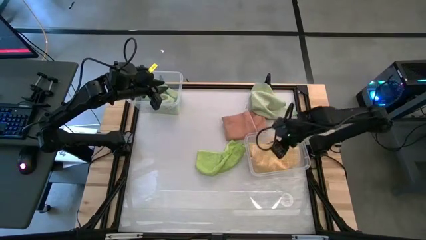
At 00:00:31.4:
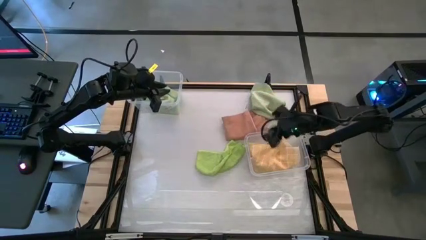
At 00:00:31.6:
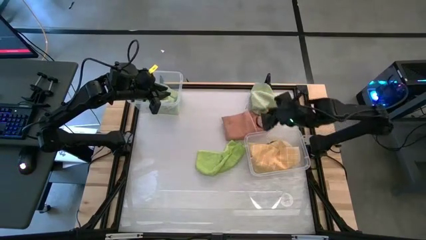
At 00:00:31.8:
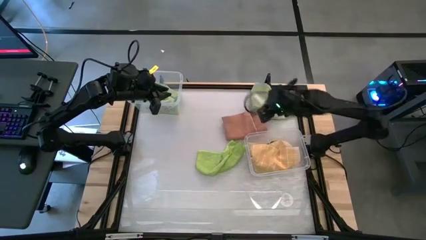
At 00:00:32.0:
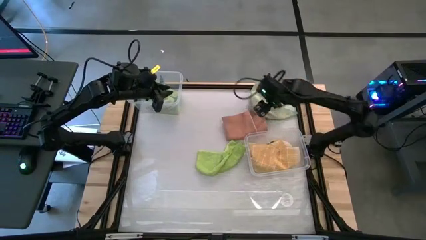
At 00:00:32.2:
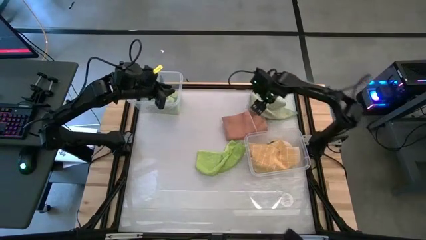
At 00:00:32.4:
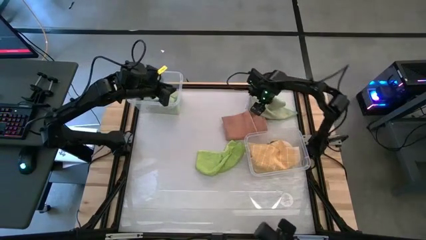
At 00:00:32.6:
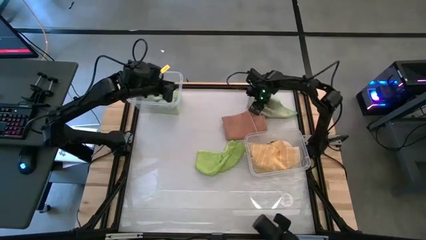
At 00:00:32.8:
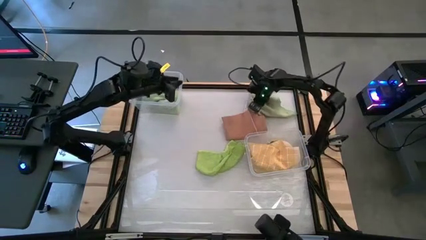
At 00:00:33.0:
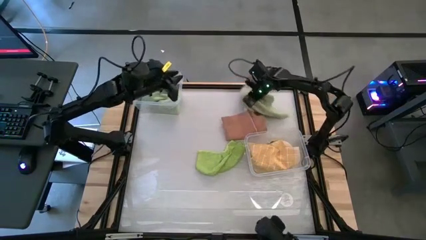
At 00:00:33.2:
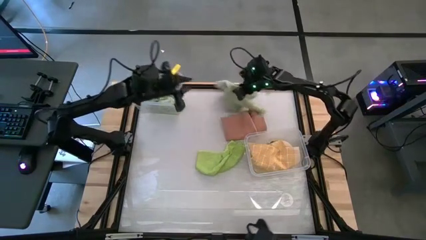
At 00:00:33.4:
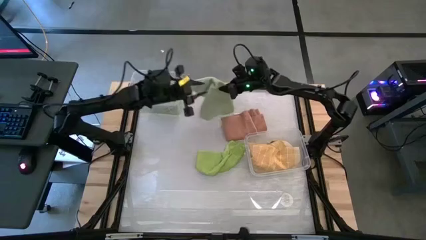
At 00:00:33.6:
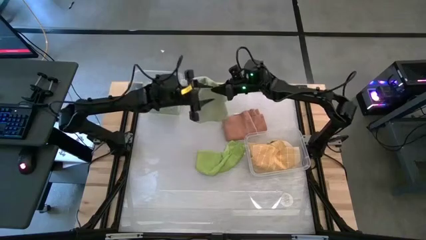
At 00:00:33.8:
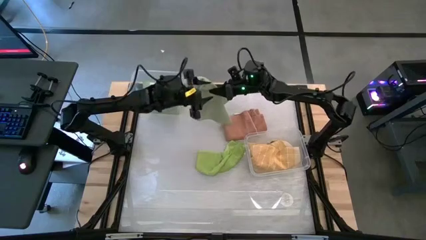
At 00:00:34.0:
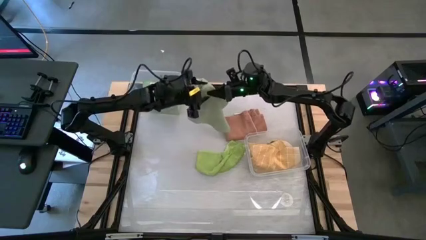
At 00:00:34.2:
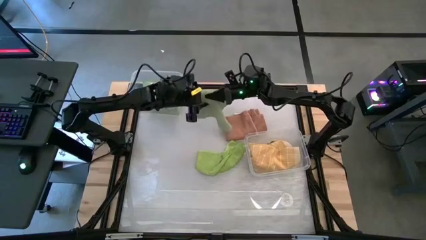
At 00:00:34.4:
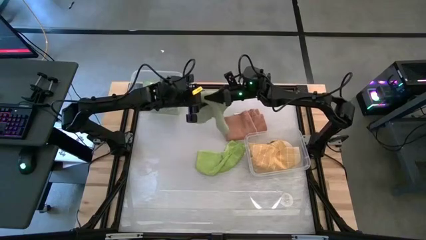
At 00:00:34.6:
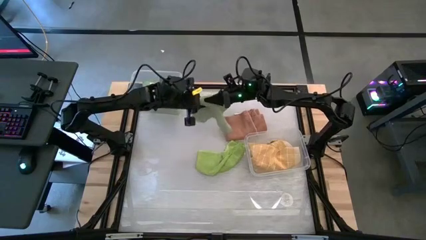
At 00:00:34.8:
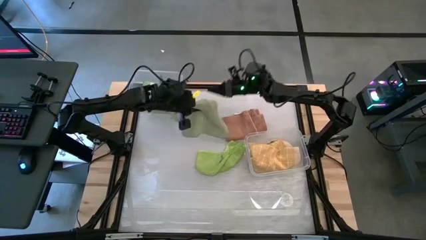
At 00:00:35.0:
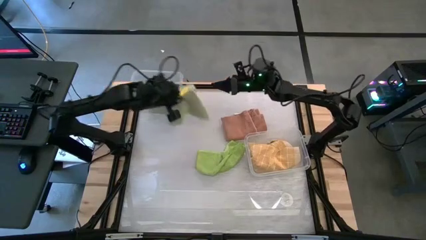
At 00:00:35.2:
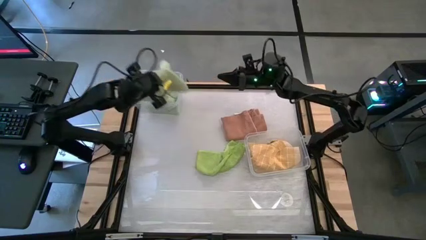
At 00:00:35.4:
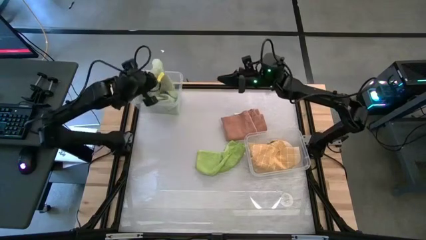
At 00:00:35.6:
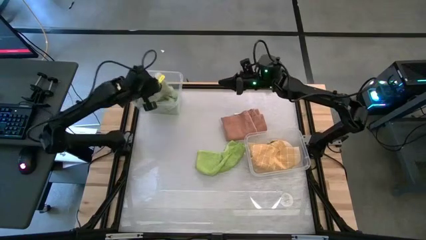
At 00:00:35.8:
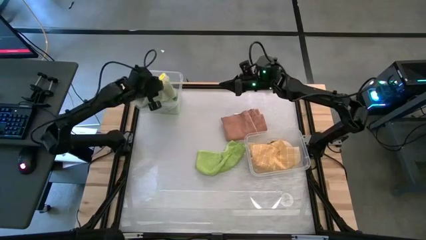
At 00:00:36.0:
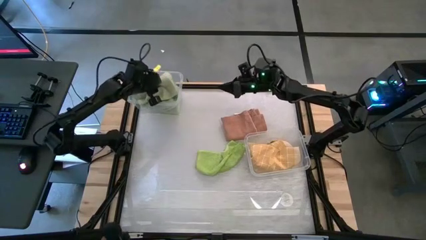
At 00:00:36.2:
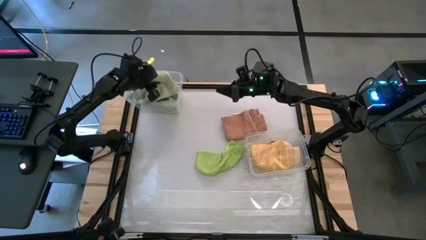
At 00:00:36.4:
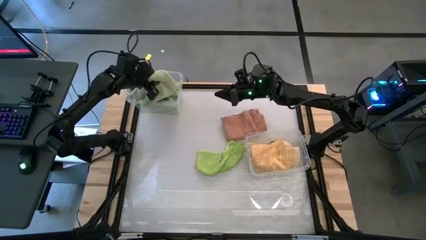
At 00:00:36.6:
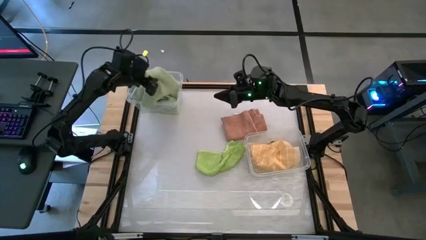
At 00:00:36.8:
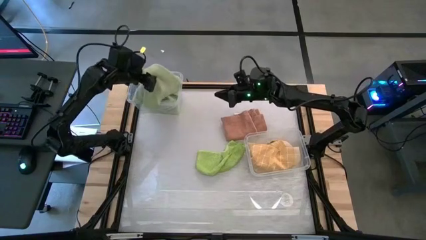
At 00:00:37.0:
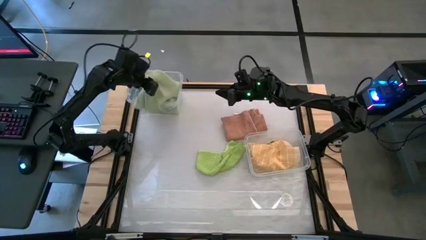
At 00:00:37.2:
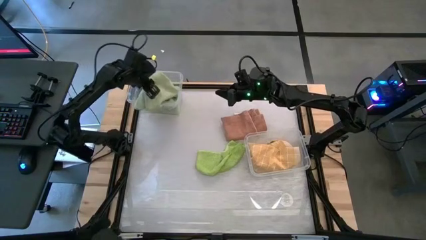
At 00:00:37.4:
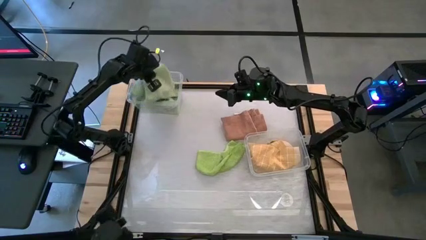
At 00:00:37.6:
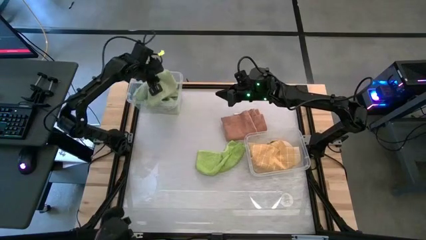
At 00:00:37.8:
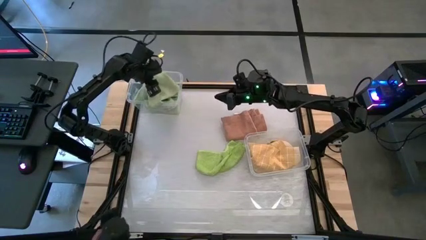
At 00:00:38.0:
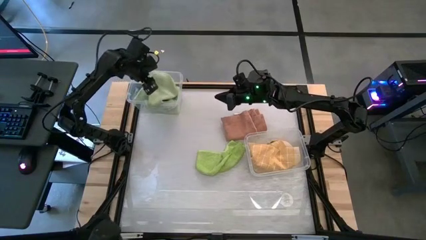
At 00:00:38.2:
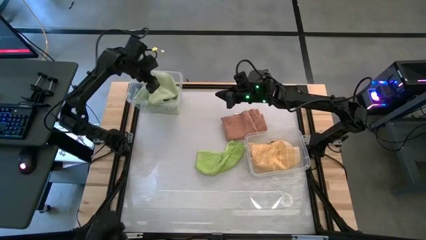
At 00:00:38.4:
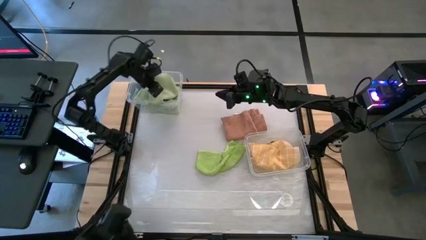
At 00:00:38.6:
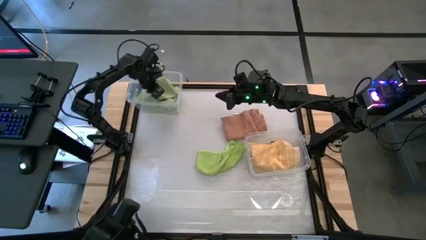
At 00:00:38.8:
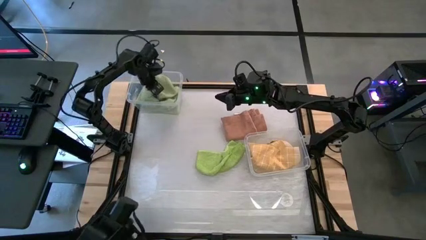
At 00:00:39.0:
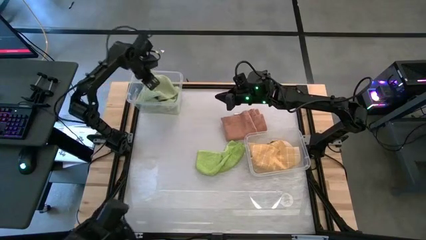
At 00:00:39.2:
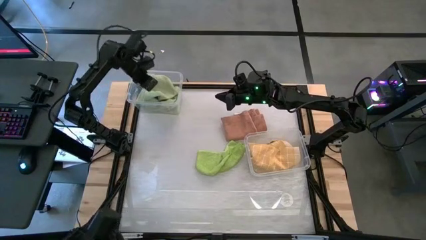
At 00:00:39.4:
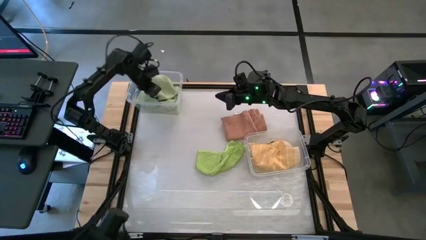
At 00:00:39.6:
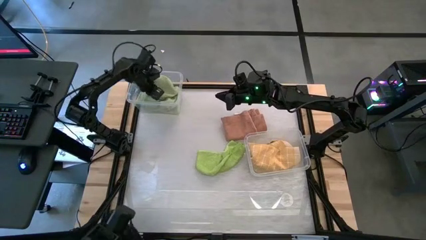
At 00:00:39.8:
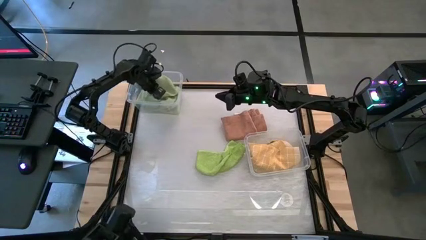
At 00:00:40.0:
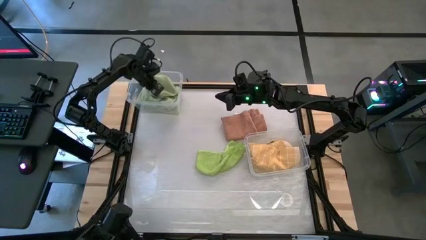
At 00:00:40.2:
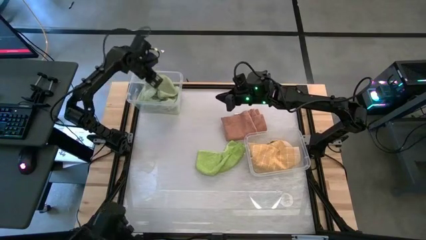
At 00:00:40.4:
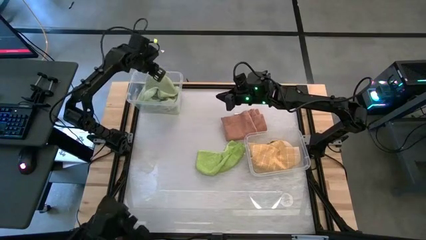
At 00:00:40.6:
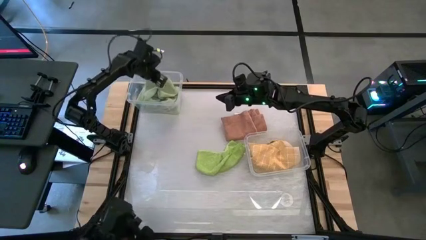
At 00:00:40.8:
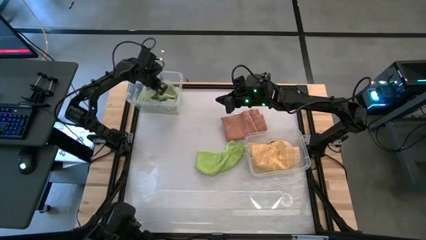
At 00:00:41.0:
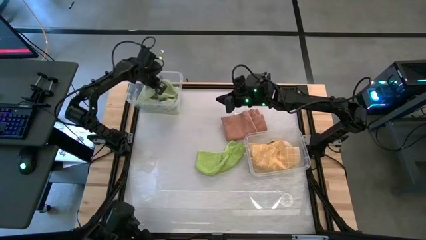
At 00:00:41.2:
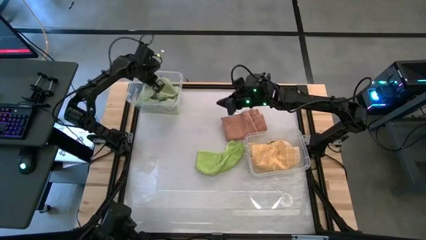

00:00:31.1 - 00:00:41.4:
Task: Sort towels by color in basket
Put the light green towel into the left transparent bin

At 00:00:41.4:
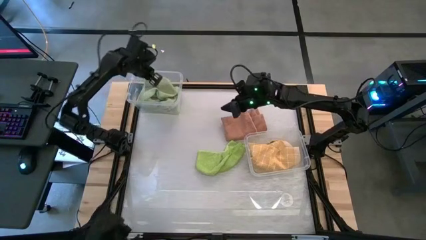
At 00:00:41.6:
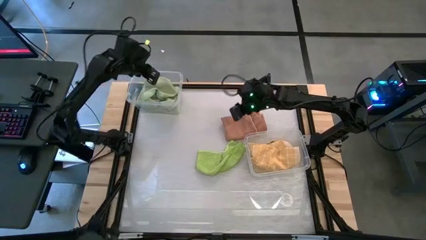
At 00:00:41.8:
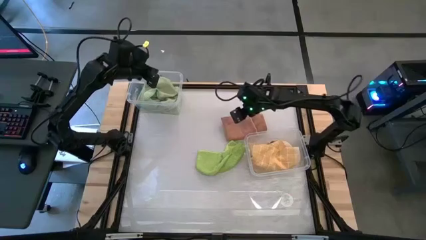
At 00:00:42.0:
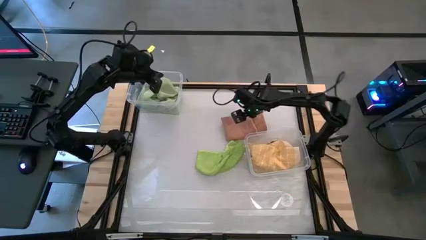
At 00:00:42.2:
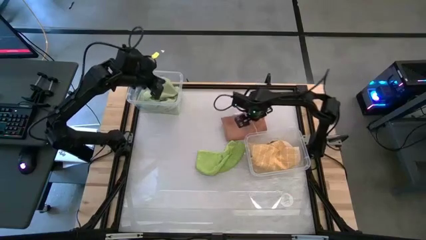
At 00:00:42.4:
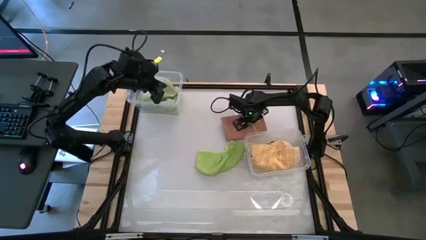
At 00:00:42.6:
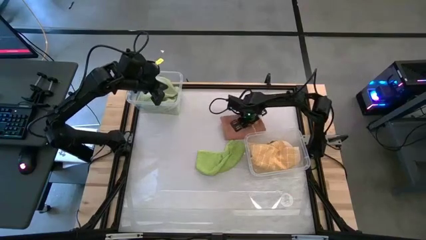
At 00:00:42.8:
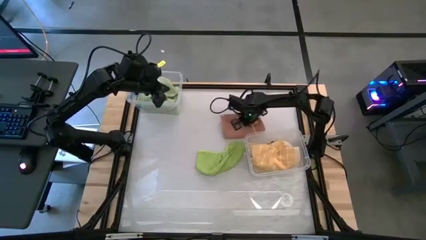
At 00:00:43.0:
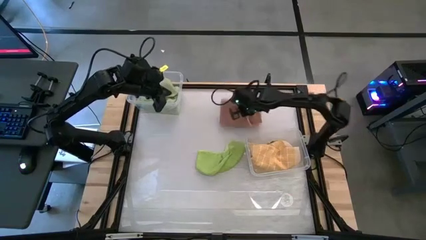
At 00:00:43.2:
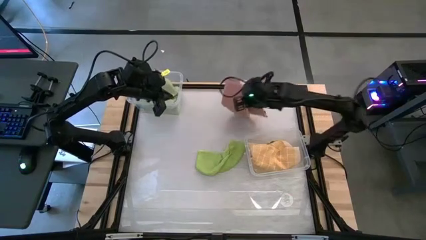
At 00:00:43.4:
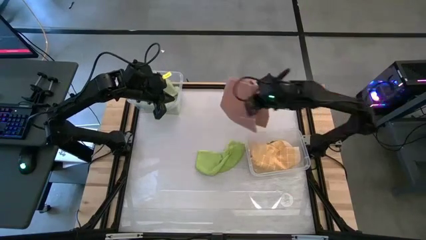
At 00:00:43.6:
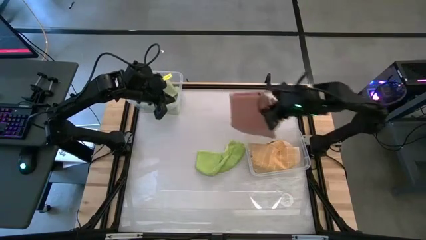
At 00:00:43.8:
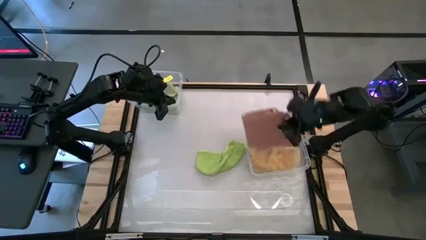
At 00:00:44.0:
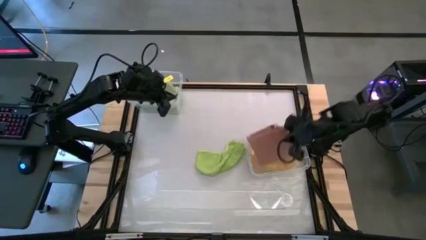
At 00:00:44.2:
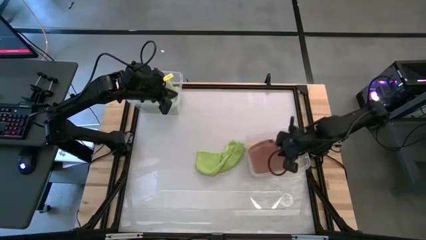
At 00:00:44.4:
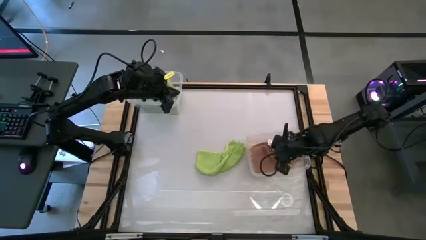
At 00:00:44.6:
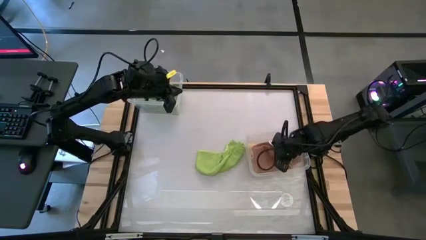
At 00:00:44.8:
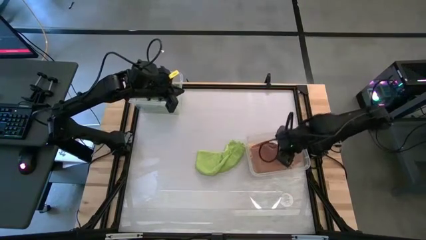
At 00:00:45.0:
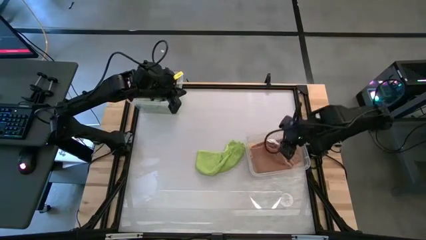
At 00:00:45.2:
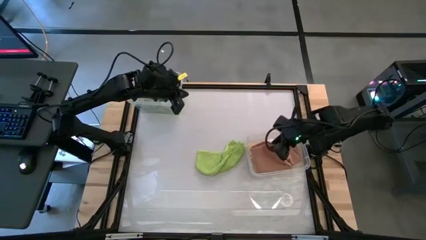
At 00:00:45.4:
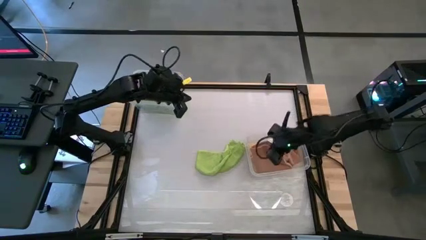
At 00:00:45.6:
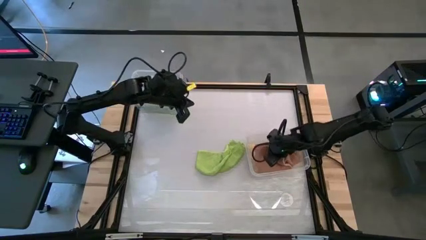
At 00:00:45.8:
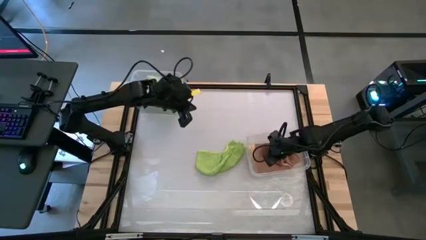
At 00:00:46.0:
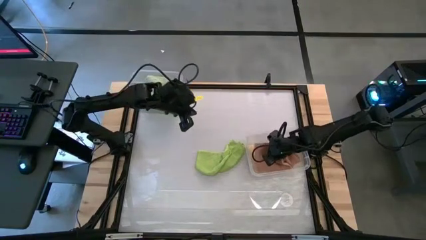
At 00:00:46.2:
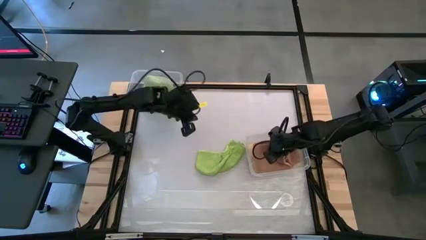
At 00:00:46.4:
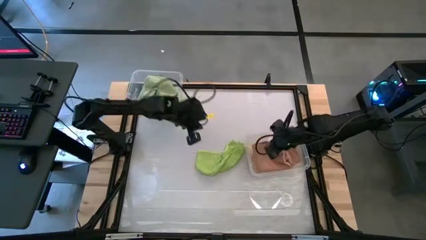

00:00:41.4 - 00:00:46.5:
Put the brown towel into the right transparent bin

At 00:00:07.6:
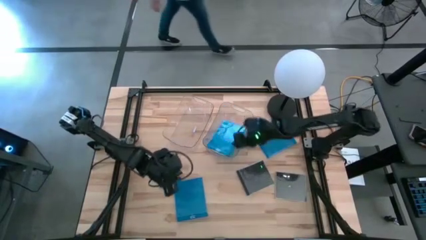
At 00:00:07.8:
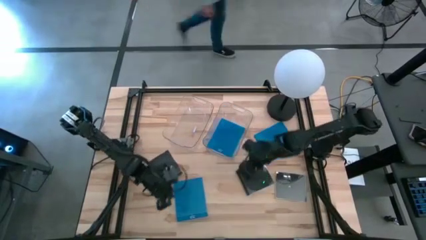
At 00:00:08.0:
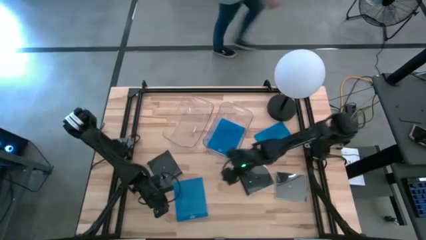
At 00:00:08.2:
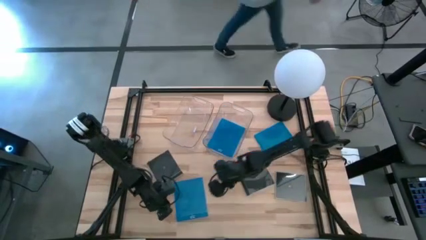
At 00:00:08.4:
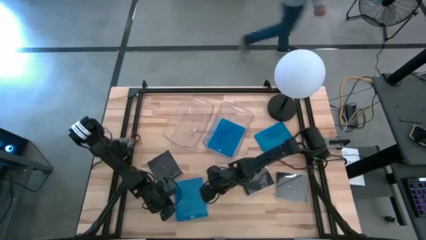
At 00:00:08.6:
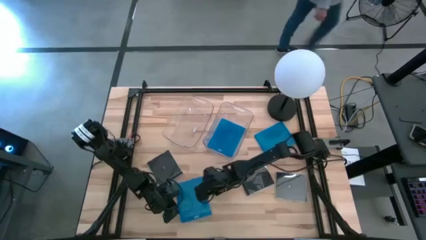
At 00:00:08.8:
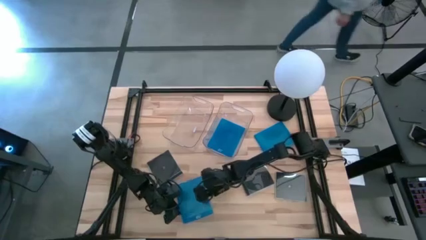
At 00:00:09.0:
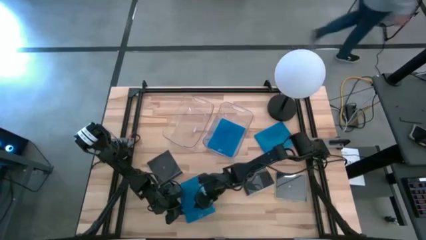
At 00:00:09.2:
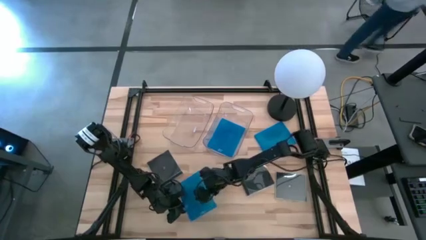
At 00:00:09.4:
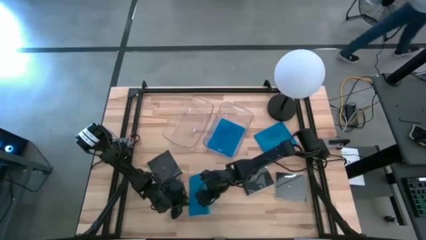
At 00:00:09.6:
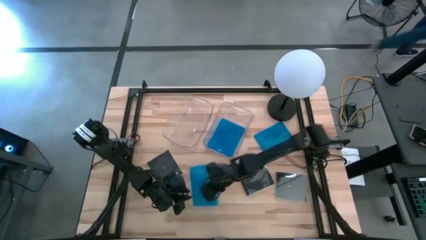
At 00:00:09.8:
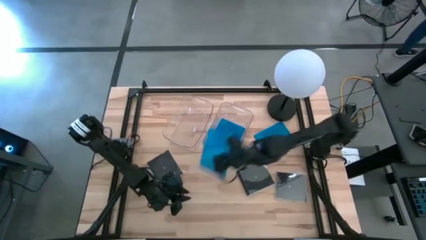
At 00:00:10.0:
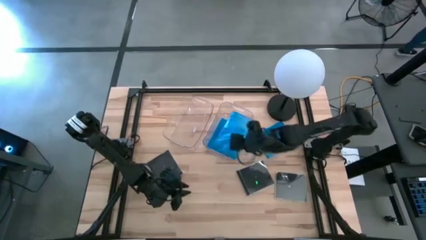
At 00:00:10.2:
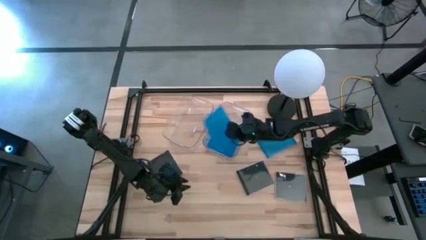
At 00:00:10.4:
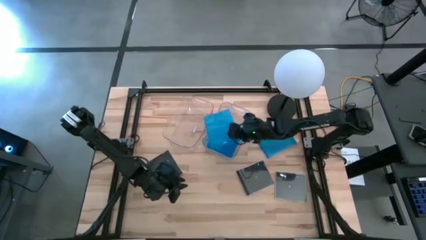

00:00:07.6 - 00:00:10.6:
Task: Pick & place jewel cases by type
Put the bottom blue blu tray case into the right transparent bin
